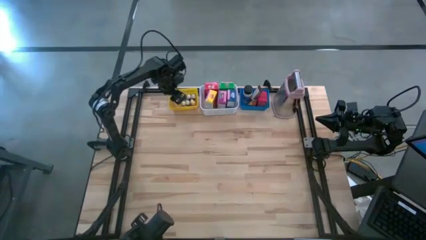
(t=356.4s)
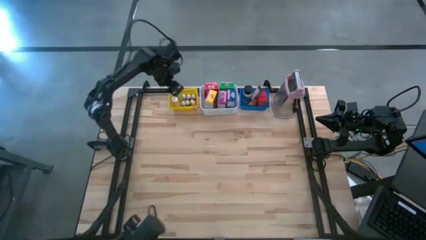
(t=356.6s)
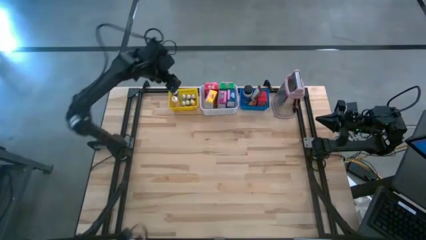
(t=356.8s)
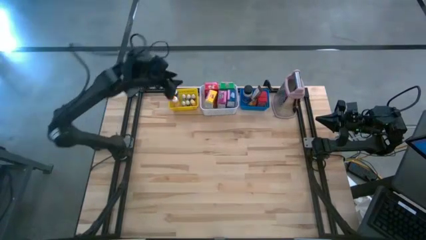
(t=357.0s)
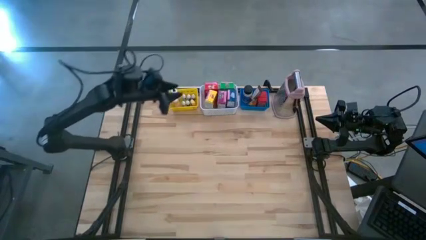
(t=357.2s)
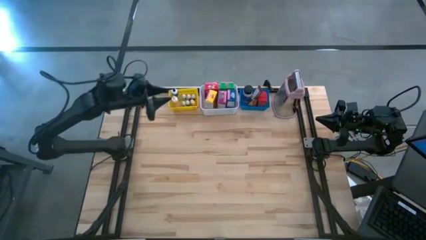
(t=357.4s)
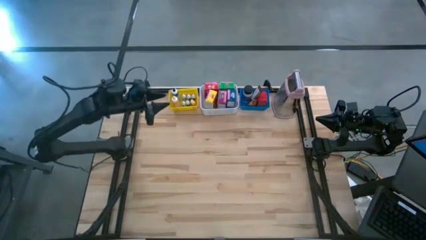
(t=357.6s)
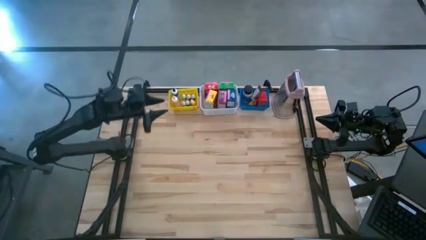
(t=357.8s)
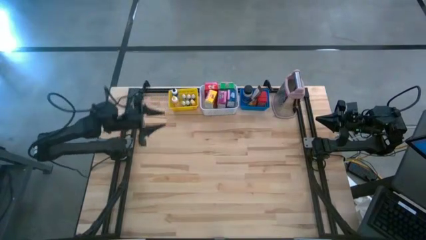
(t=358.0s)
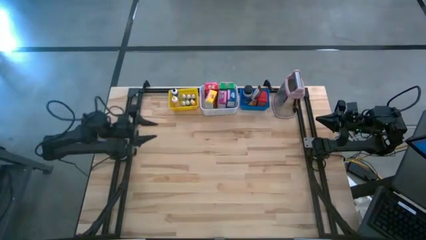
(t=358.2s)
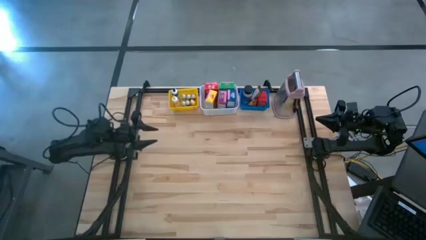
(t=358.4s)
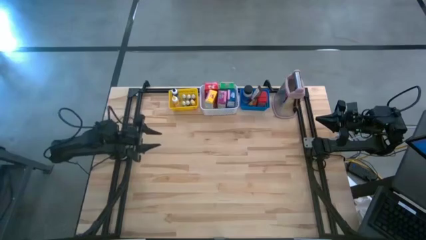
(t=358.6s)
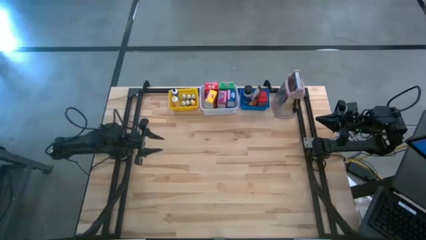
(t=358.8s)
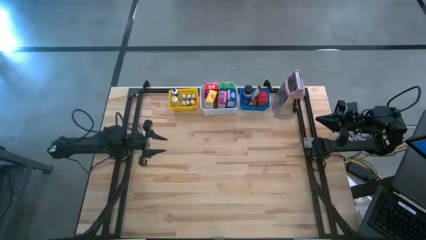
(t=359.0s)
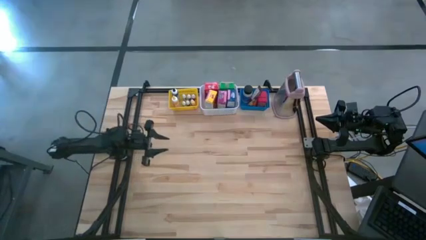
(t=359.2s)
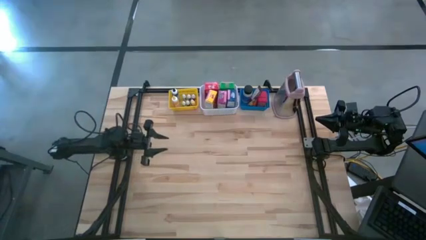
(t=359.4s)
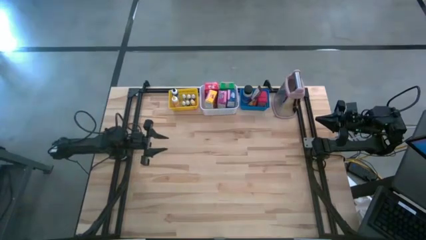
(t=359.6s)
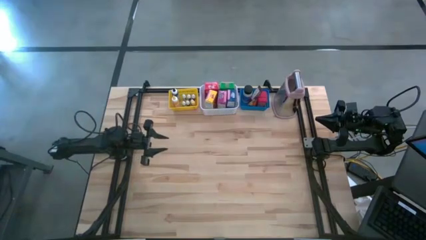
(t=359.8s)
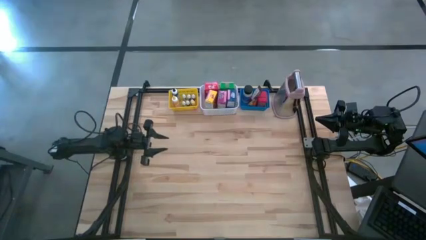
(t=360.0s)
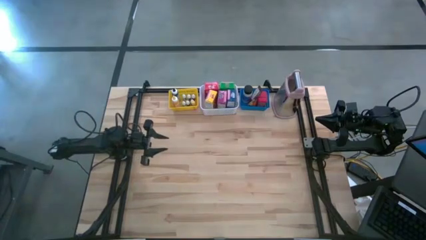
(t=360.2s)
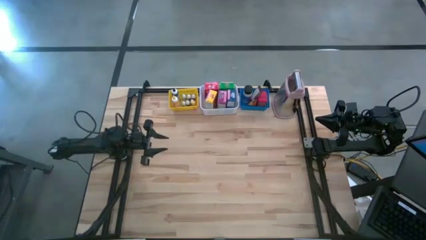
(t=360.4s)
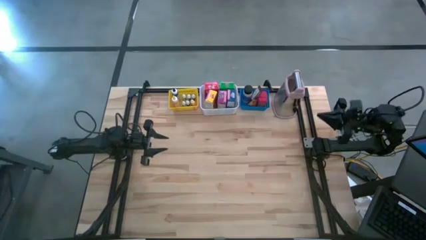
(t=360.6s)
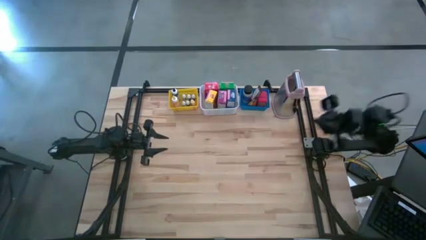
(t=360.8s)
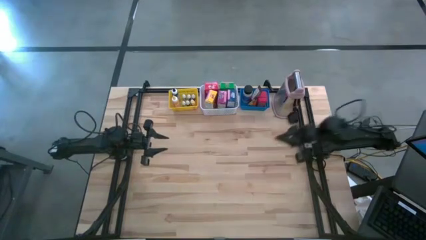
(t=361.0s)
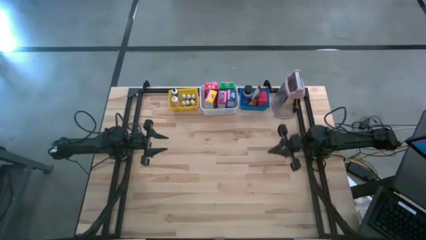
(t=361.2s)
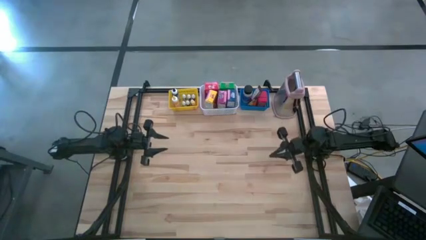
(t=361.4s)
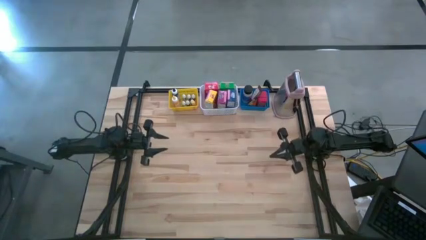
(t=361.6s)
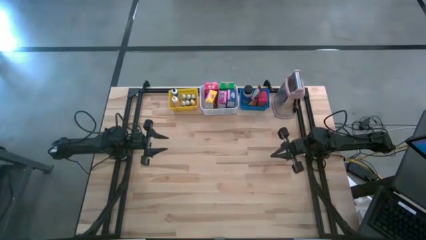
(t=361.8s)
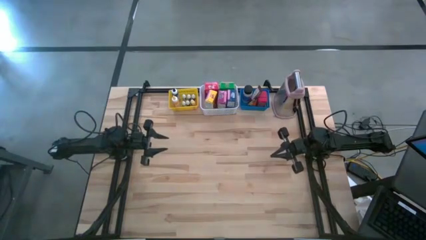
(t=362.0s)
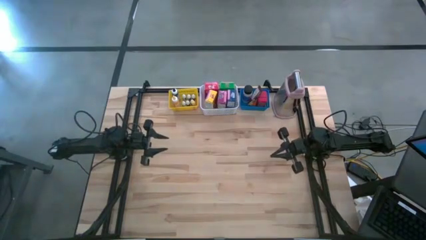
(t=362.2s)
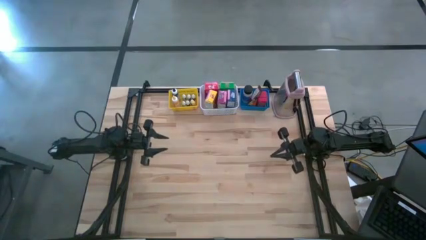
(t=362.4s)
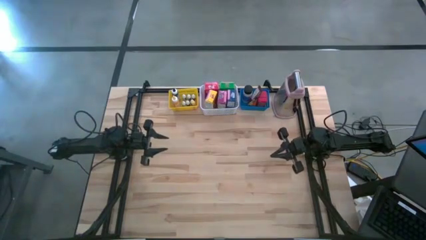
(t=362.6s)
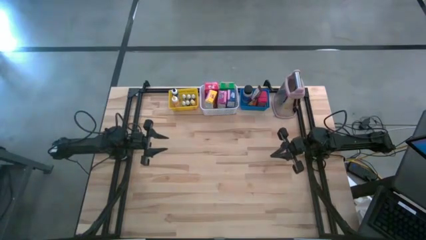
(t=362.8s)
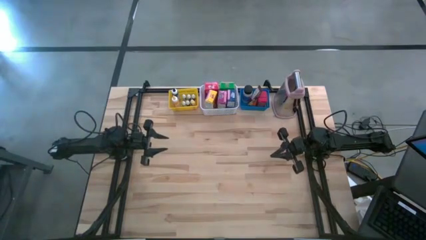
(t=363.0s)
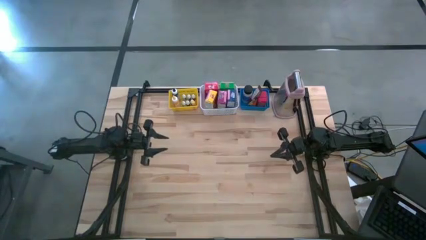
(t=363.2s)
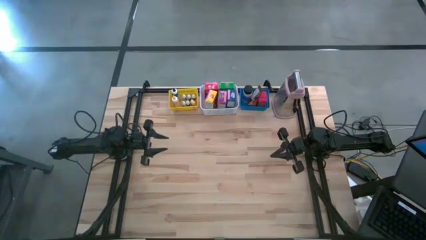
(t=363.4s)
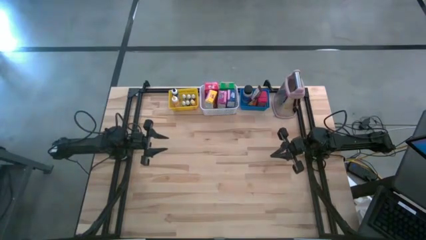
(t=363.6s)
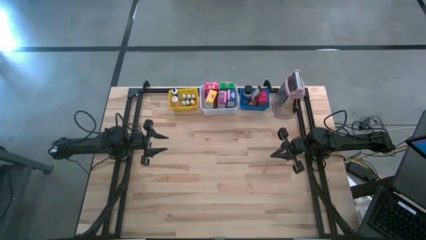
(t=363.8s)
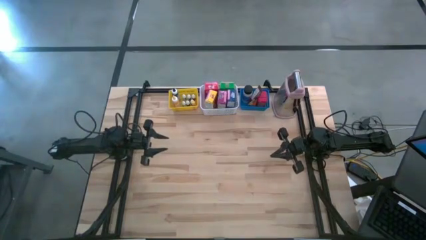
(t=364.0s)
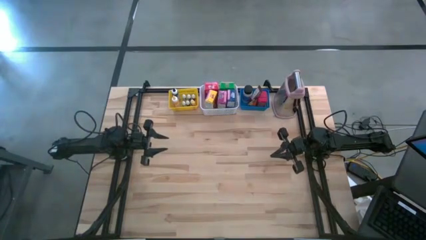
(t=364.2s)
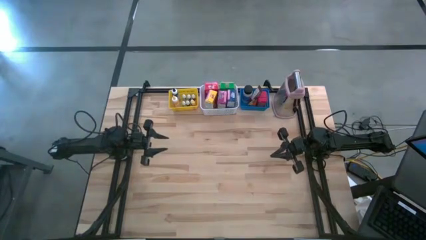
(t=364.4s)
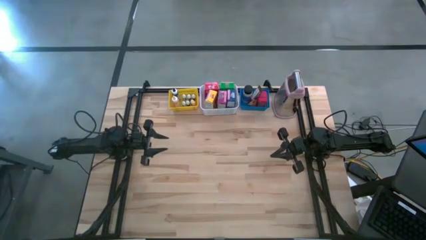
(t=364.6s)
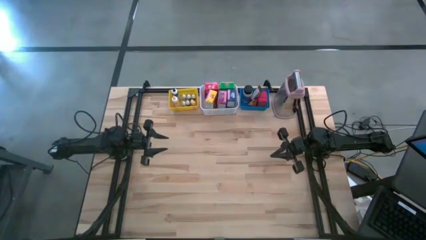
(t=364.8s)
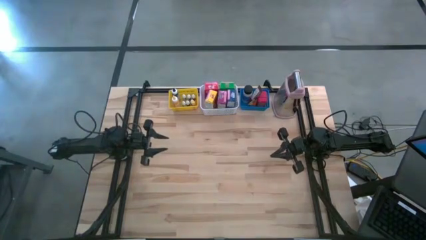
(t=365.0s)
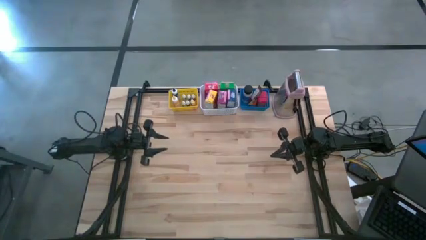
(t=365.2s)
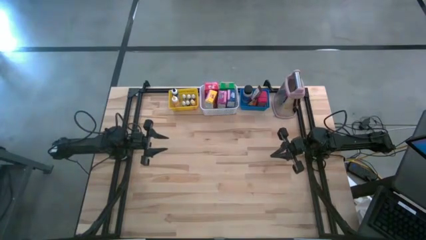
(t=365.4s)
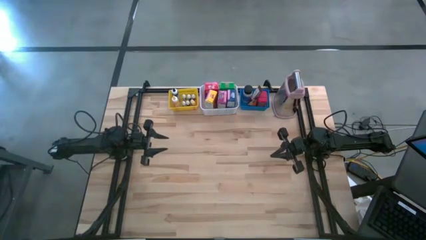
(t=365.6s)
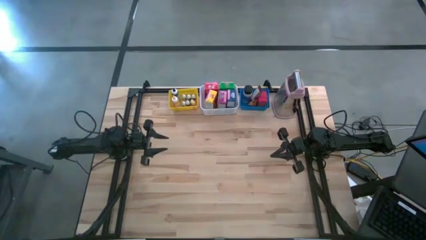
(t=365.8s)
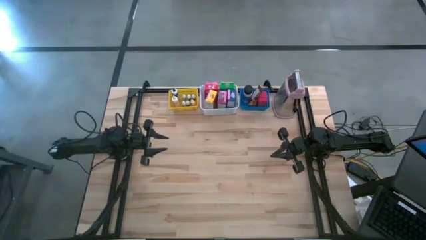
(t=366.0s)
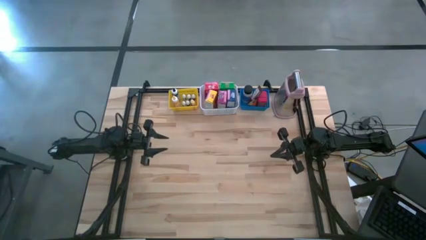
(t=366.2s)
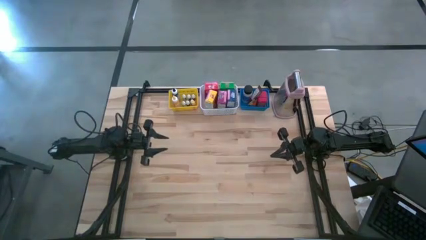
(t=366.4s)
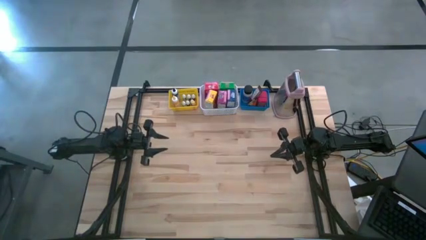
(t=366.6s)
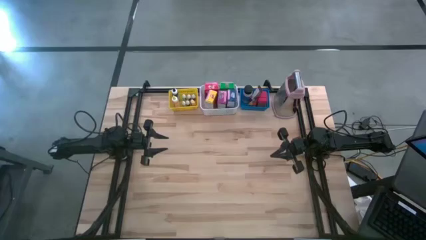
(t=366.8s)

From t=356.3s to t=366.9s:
Task: Pick & Place Kitchen Items
Return to Home Position

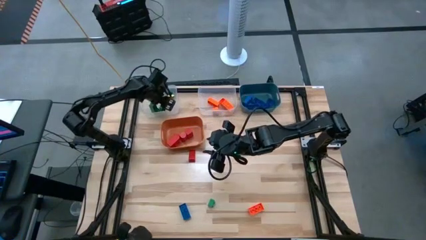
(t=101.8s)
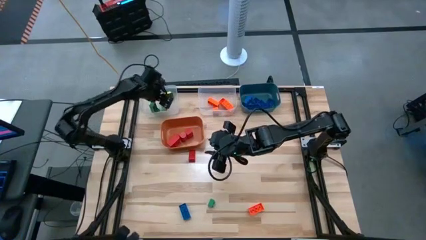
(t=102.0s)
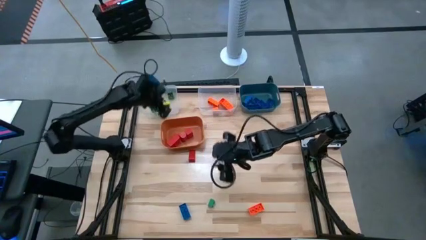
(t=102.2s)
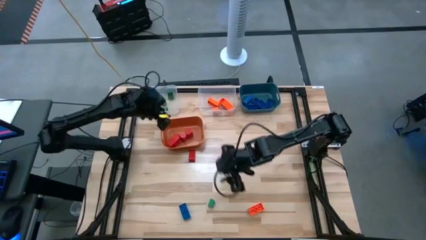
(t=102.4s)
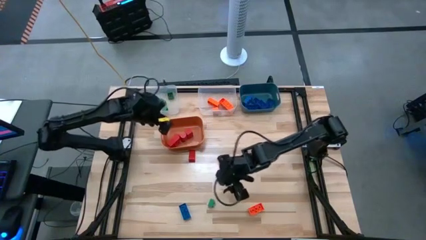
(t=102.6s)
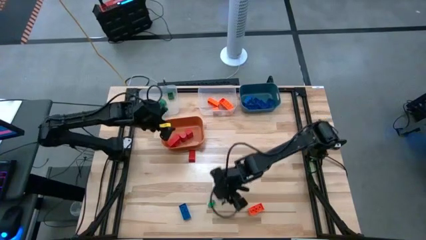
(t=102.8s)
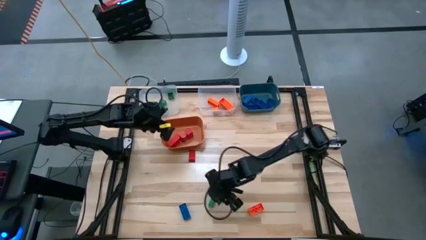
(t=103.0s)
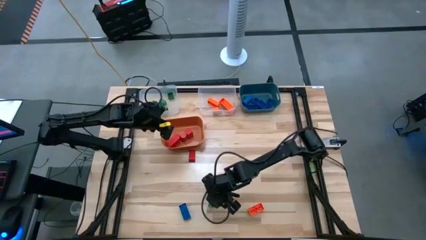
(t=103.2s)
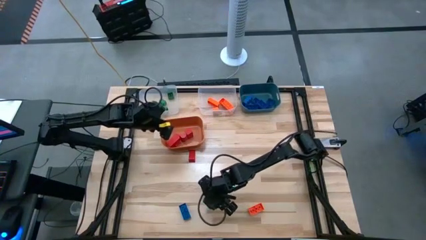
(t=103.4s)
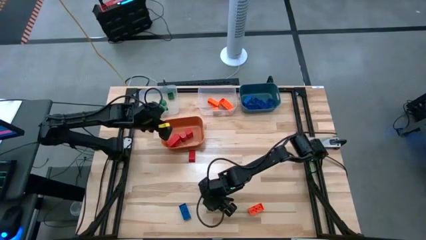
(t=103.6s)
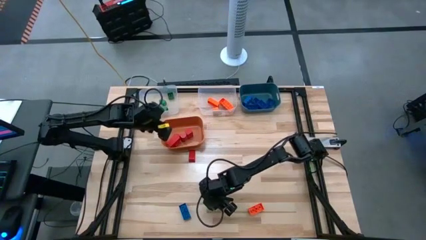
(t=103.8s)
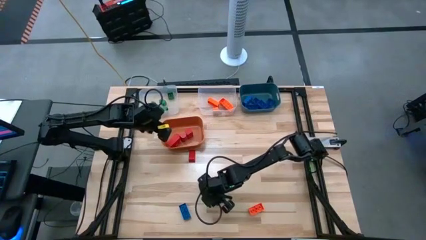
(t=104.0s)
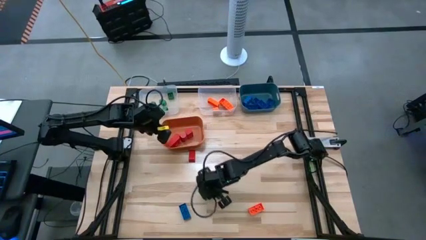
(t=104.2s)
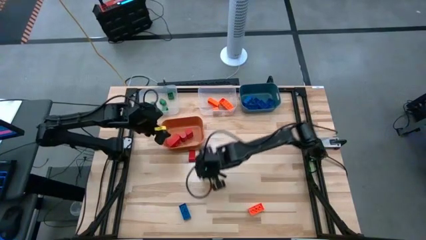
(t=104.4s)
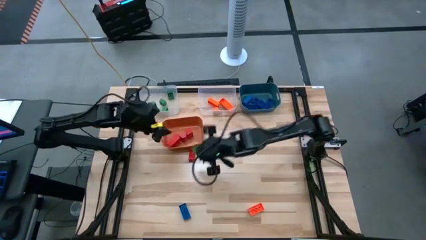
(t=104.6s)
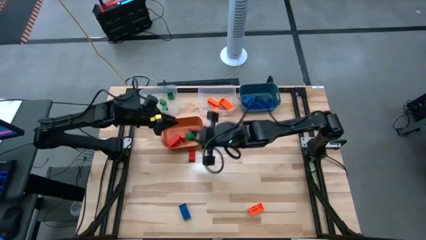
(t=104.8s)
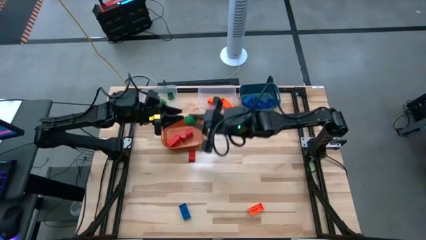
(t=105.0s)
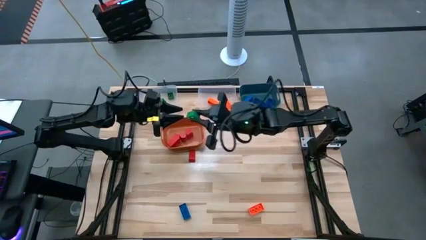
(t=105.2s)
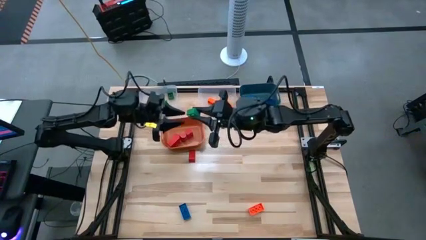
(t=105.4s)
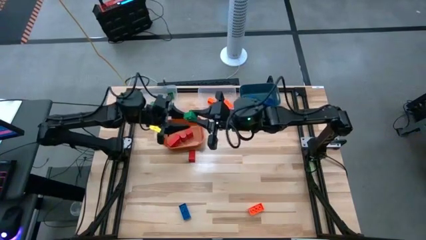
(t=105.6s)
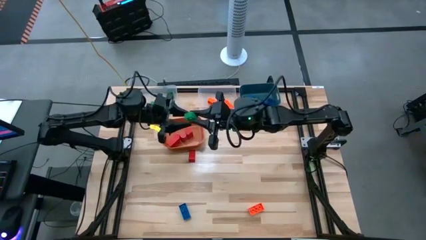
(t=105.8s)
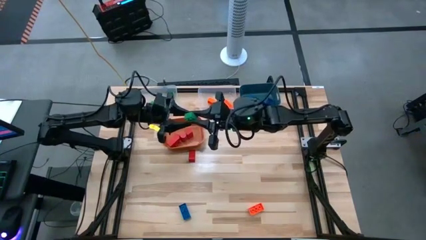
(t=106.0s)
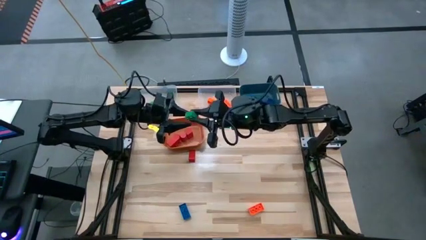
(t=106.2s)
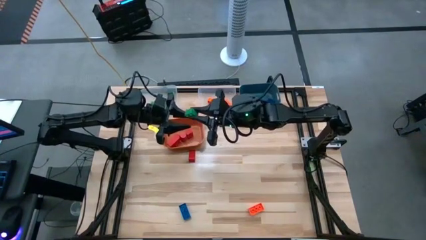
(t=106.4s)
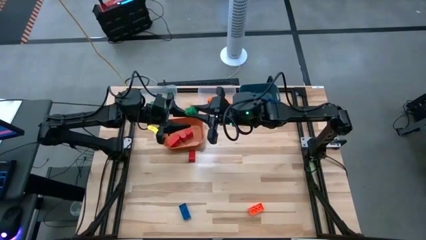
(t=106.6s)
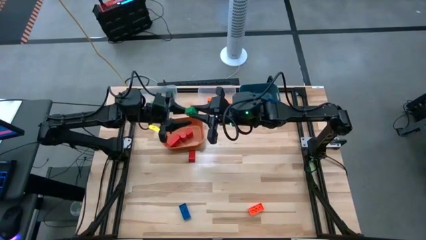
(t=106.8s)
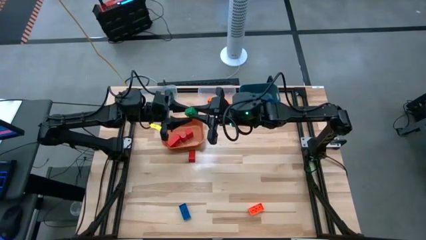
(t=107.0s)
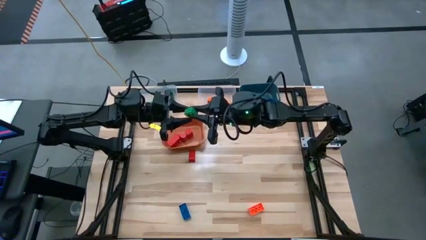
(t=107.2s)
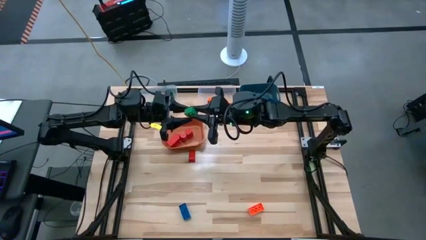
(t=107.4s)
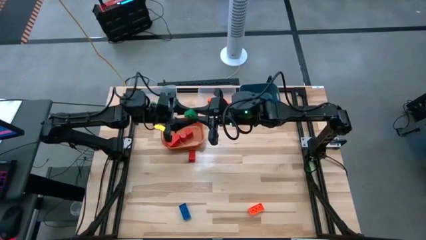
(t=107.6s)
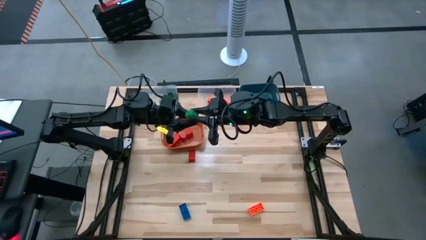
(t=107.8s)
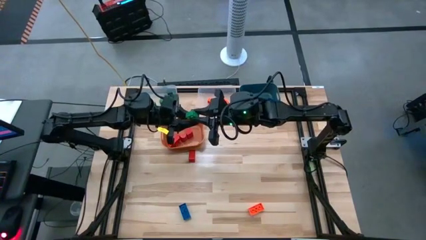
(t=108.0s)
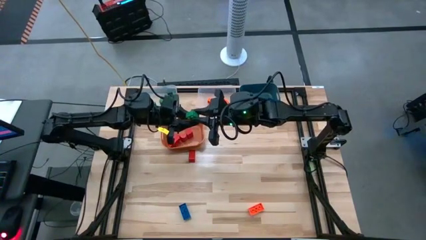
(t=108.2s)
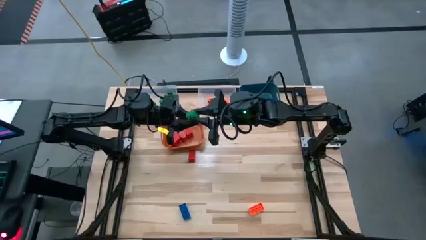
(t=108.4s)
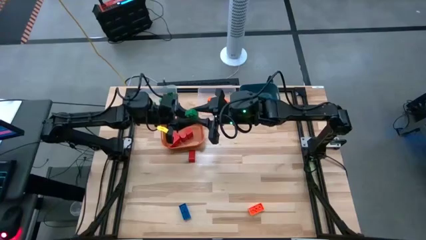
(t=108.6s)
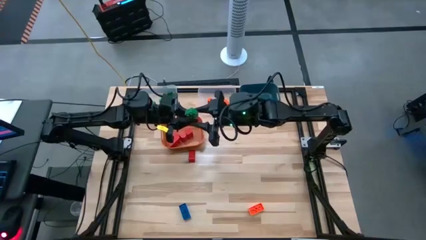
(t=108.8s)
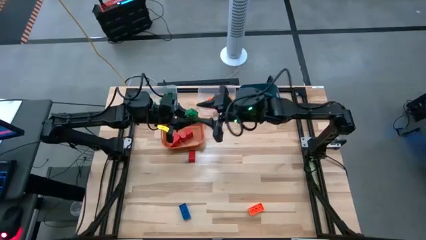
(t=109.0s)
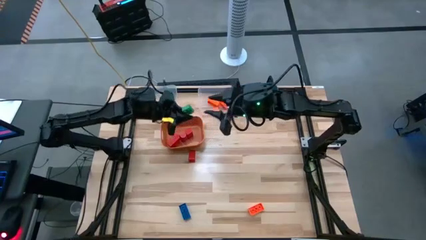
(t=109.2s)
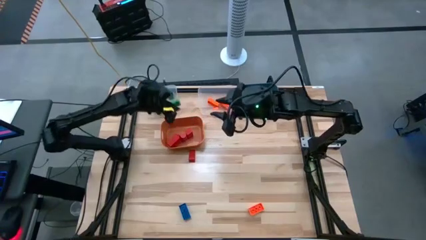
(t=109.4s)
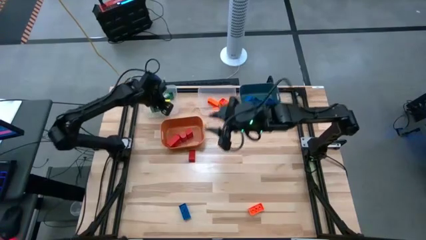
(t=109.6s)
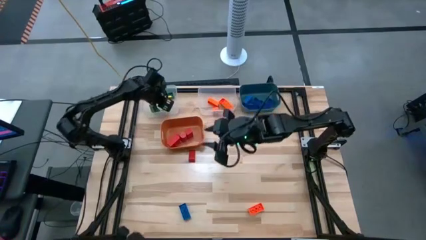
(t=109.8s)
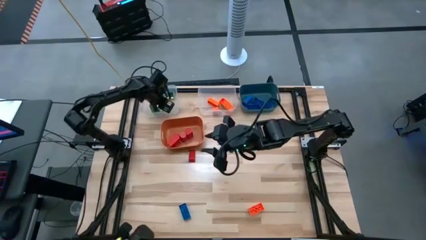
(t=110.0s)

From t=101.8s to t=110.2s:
Task: Sort blocks
Put the green game piece into the left transparent bin
